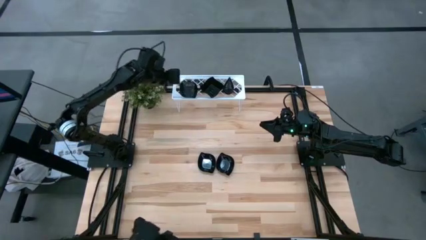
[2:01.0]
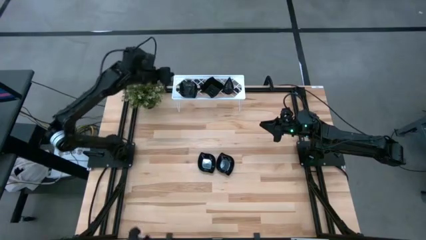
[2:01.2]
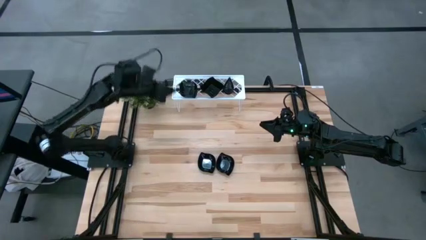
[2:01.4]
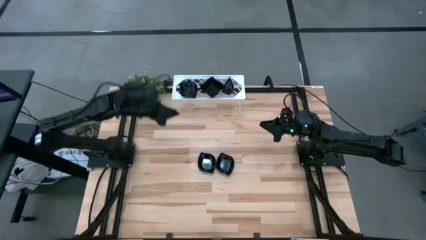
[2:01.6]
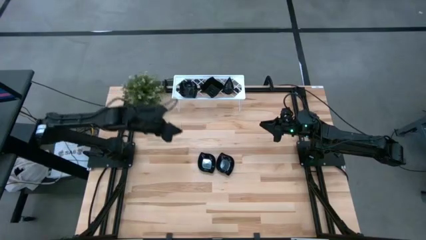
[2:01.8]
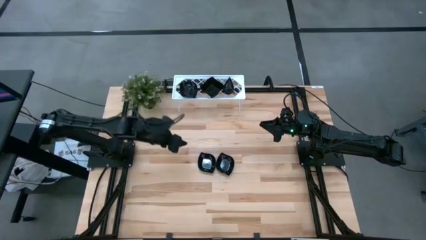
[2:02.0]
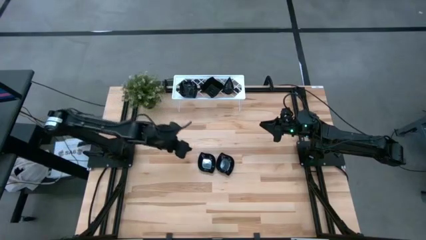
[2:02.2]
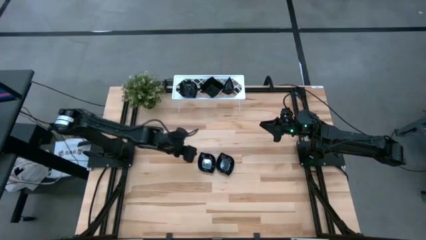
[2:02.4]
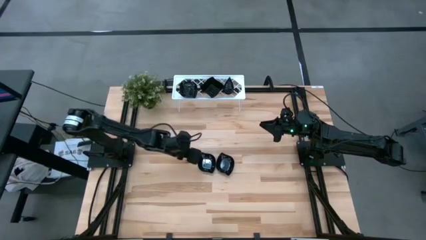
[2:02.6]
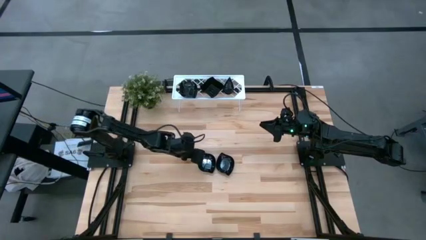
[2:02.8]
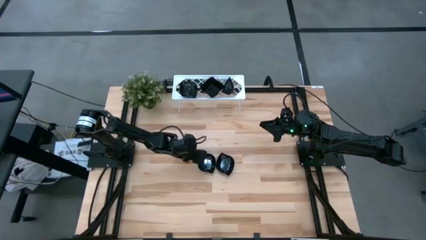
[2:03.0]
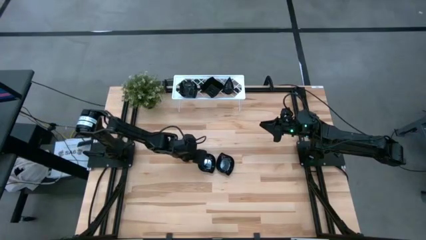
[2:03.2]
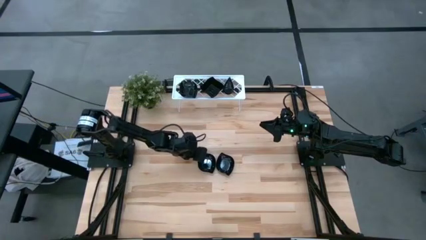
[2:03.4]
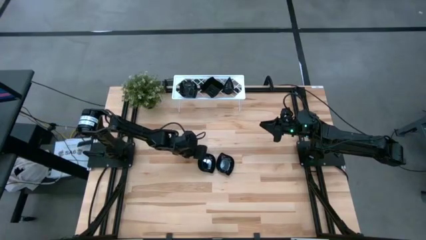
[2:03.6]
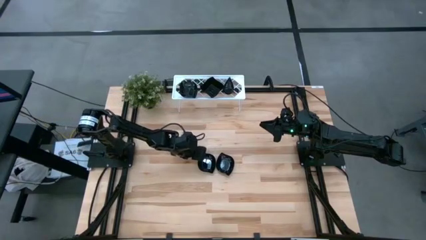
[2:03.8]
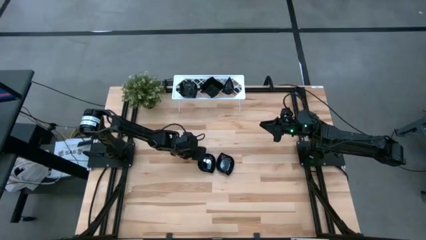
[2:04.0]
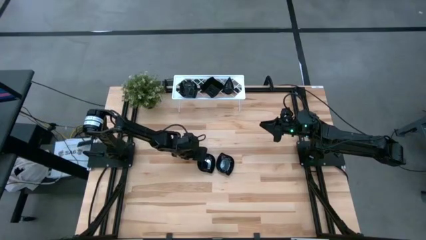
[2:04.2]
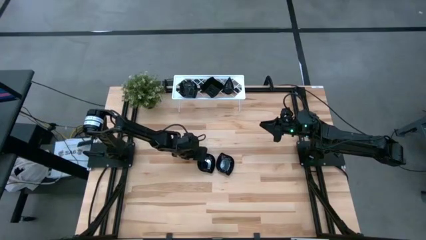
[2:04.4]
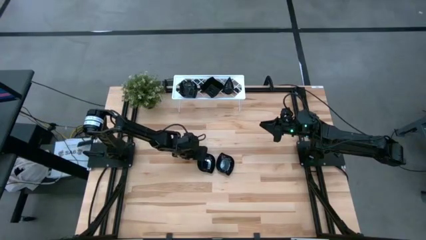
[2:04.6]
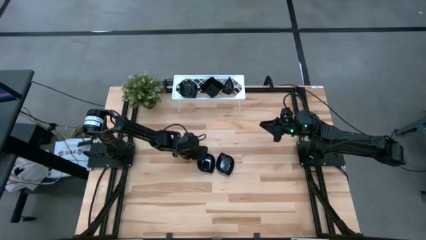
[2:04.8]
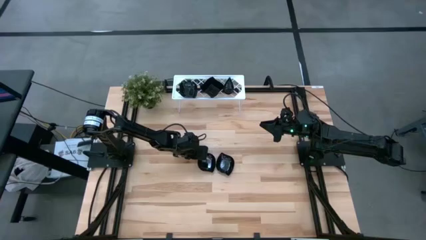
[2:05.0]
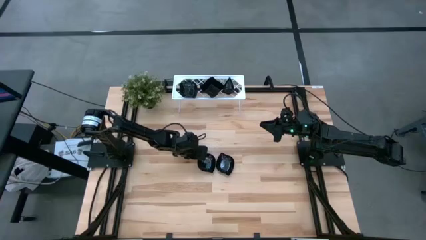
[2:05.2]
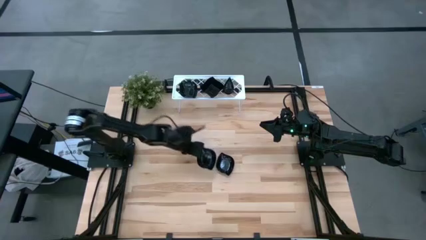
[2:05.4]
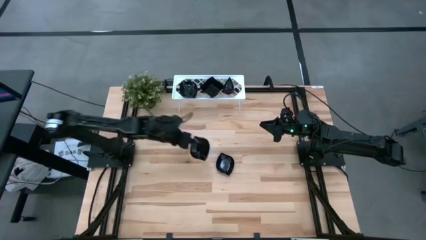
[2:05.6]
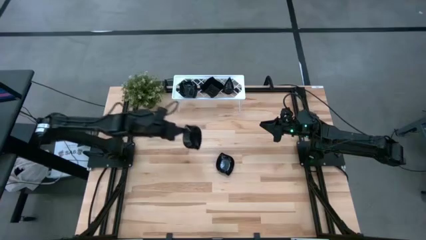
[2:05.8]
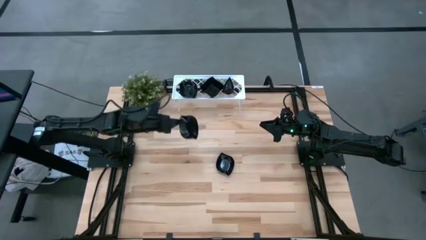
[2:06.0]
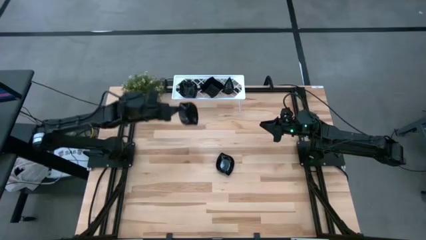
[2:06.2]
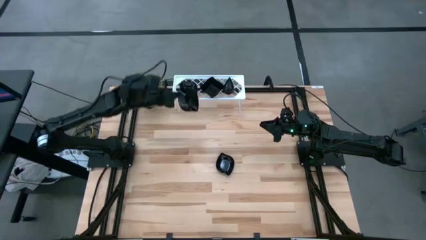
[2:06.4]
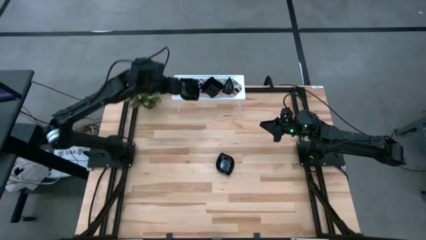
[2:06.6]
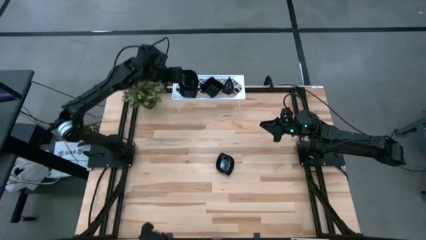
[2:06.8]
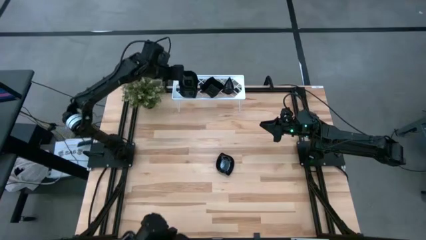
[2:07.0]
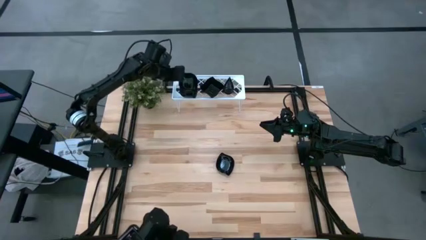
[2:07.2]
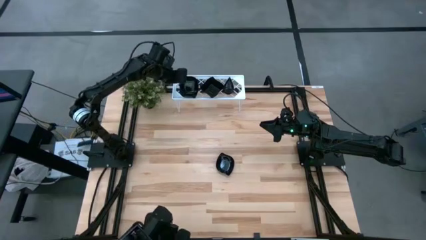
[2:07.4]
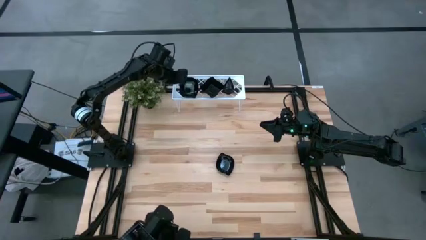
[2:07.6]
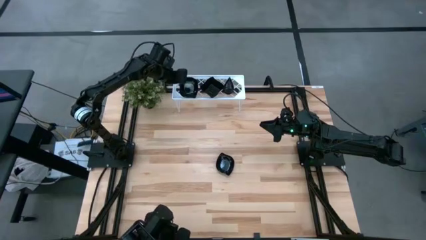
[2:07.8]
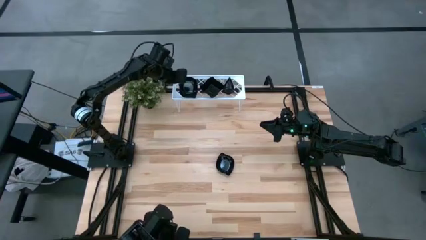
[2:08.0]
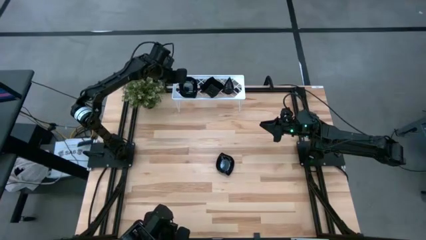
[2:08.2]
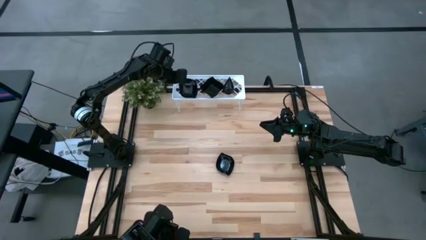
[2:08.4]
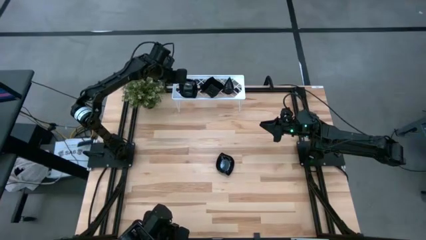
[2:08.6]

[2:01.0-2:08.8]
Task: Pick & Place Mini shaped plates
Stack the leaf-shaped plate on top of the leaf-shaped plate on the shelf

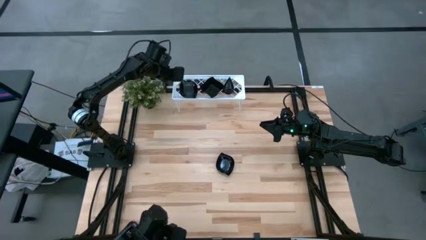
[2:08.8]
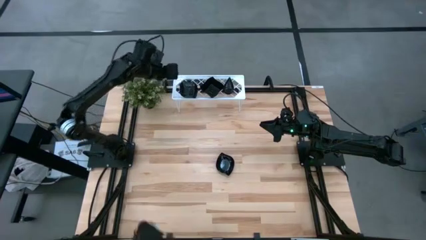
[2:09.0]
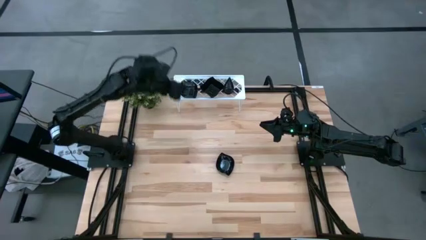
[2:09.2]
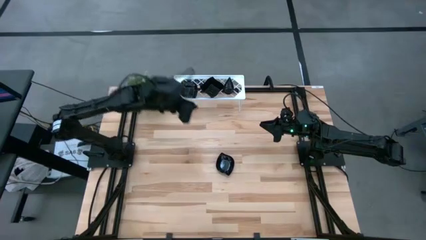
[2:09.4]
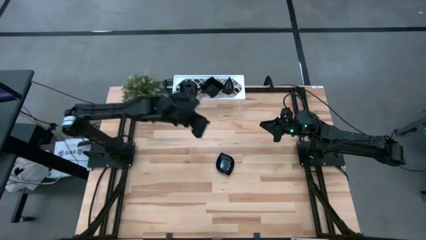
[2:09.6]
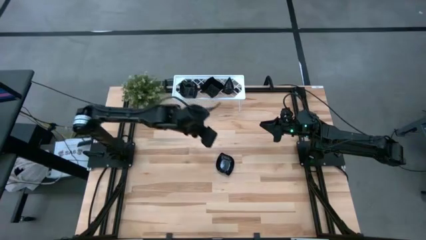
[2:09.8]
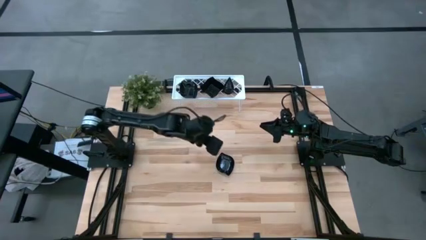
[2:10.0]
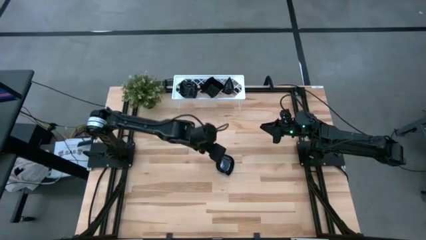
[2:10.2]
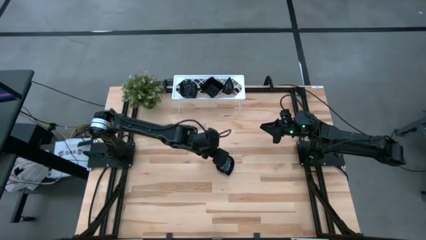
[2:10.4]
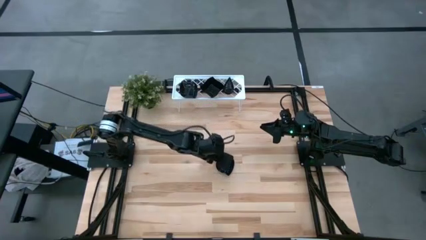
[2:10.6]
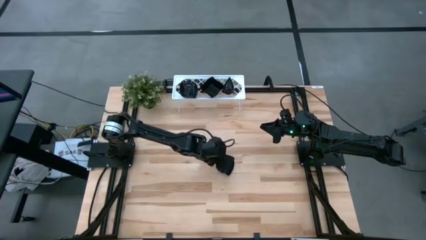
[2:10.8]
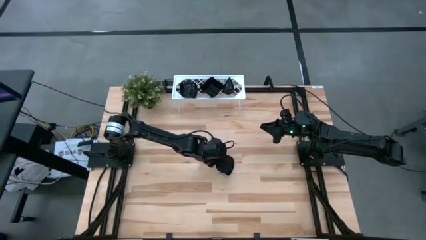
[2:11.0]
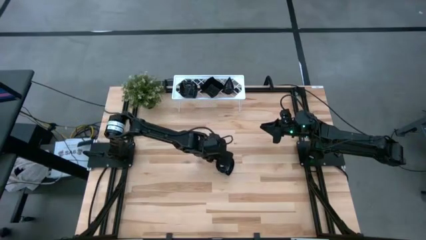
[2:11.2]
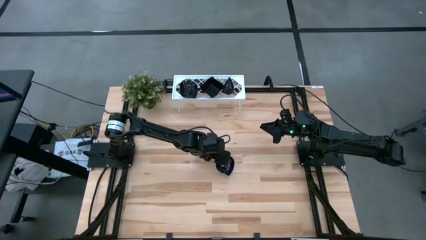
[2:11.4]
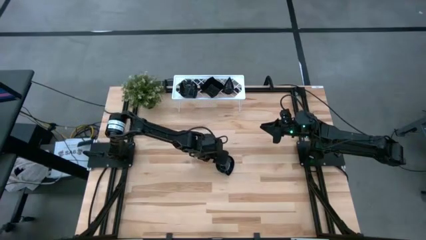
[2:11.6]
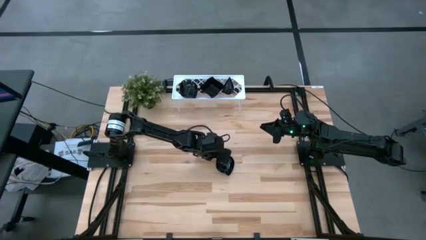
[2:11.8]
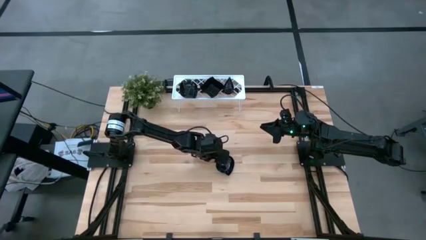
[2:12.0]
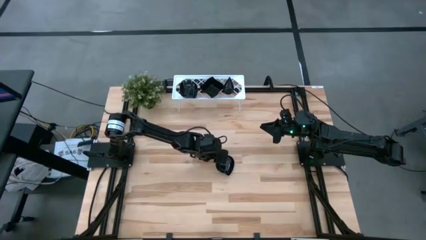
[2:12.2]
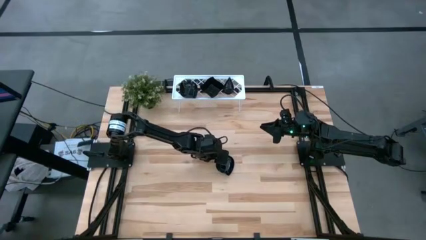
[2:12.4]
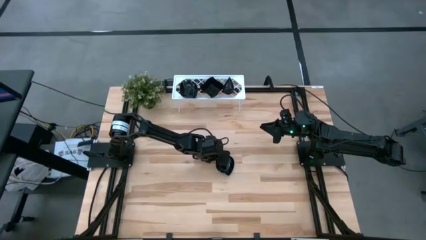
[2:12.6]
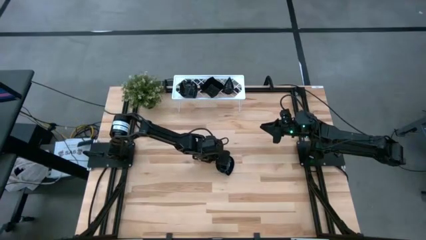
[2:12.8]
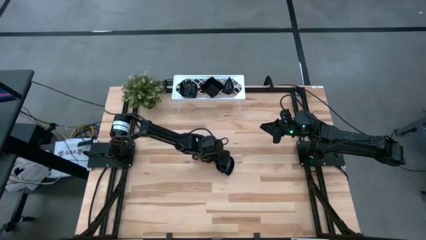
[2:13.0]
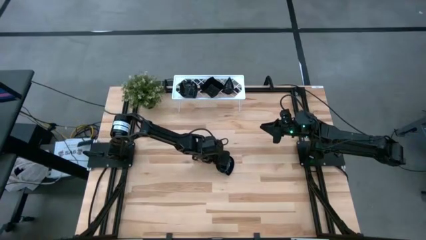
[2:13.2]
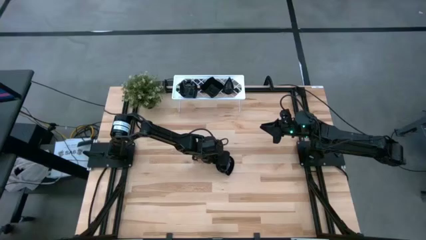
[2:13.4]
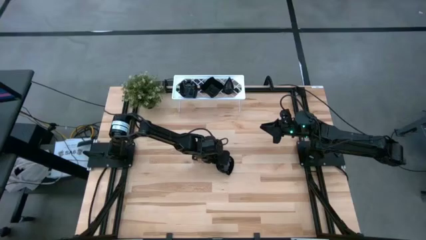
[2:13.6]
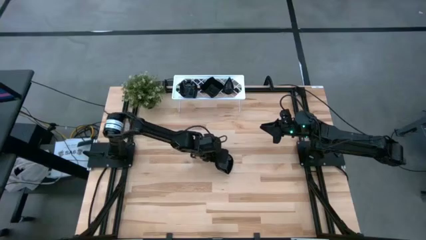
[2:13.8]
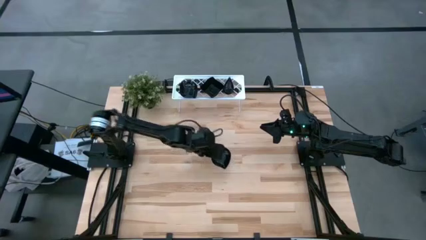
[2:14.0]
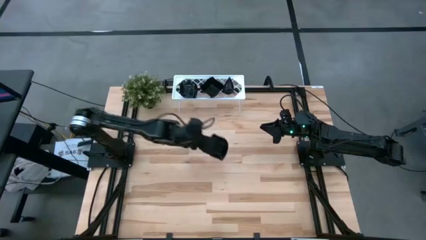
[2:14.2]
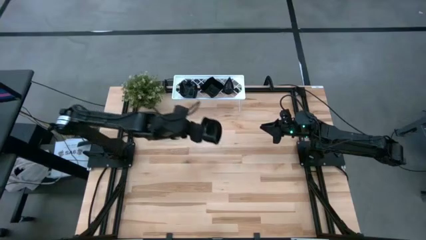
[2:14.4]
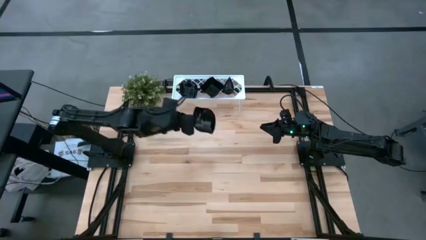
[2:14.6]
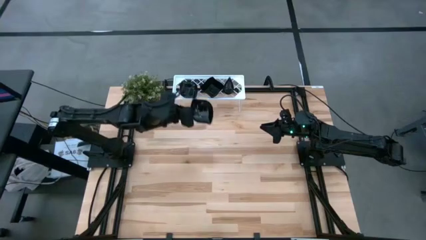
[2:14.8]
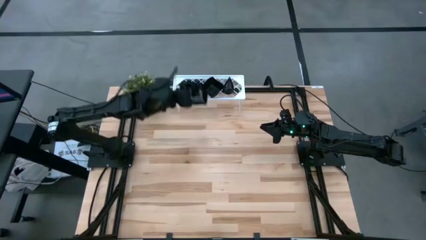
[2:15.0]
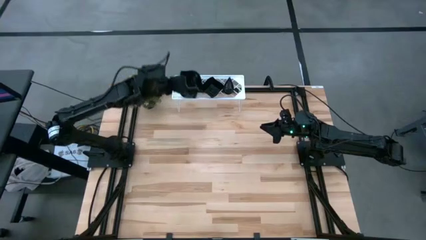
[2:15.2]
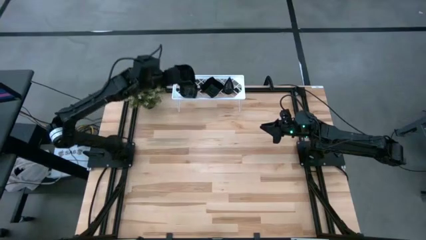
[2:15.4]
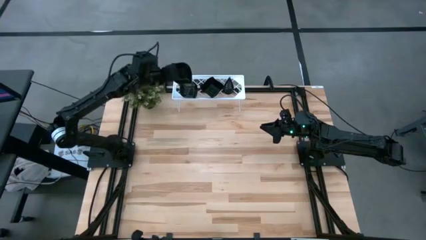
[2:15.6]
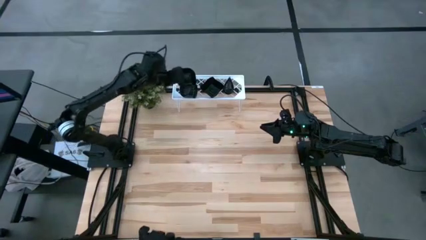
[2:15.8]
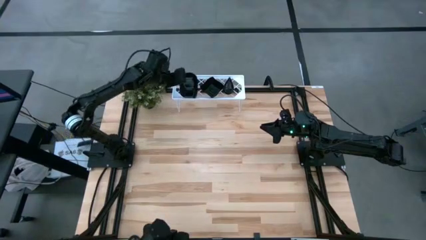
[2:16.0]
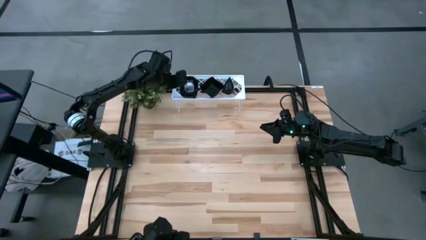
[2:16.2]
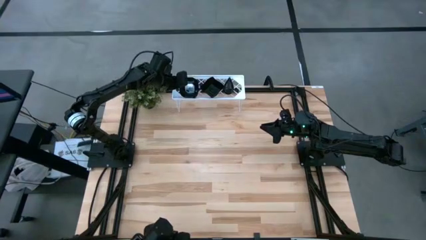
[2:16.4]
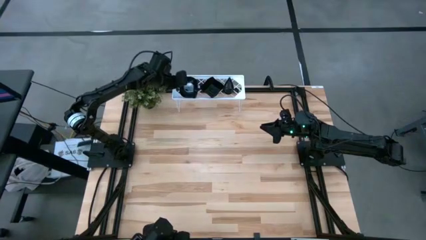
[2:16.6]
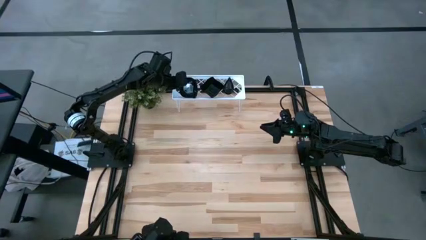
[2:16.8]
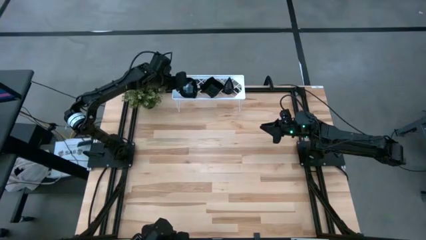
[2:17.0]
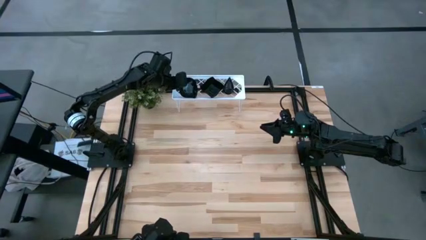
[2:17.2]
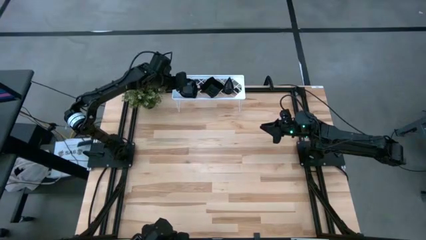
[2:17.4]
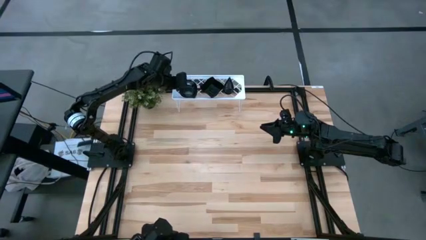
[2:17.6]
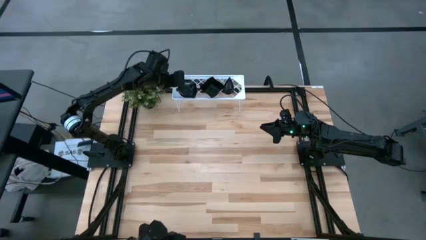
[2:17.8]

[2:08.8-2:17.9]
Stack the leaf-shaped plate on top of the leaf-shaped plate on the shelf
